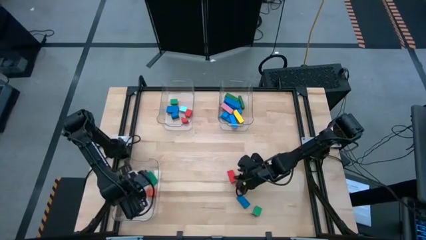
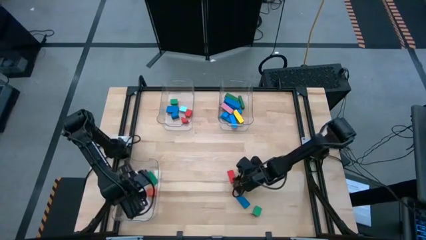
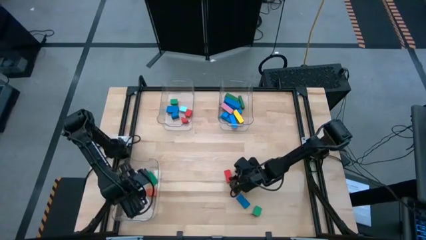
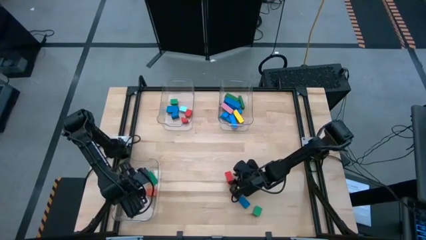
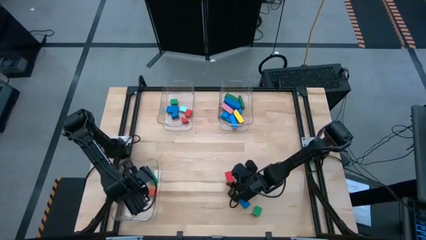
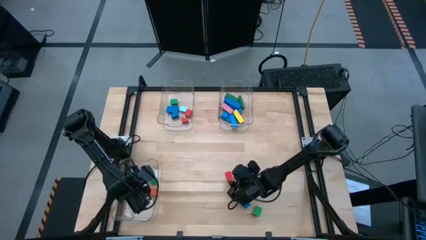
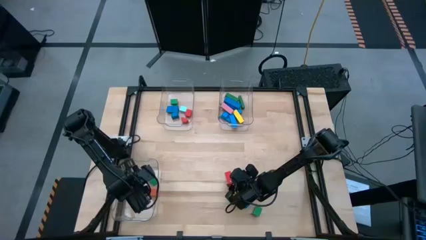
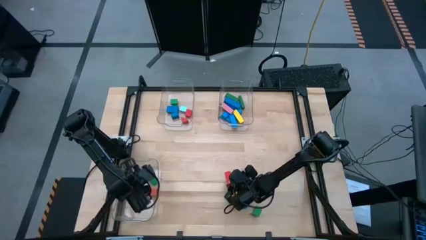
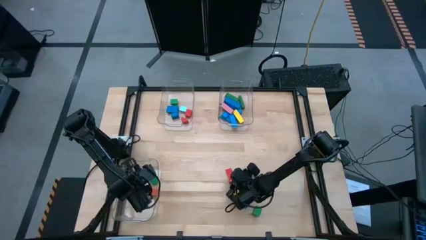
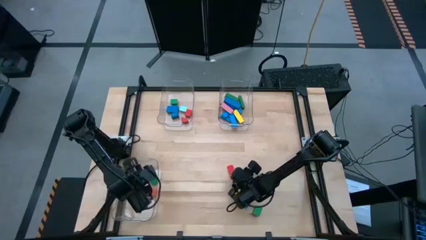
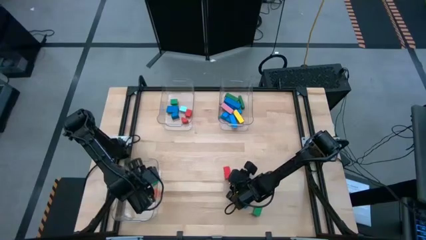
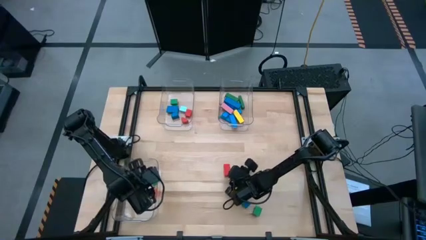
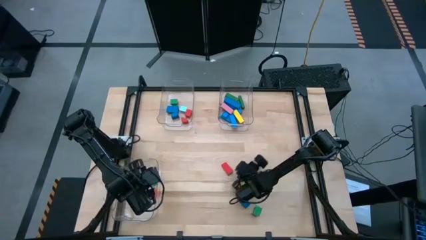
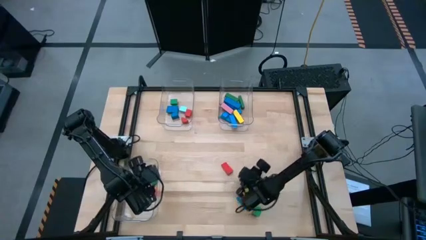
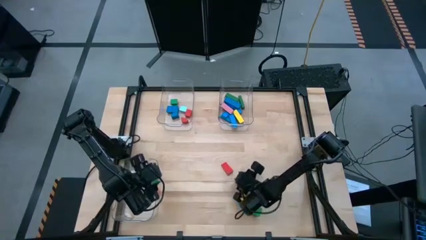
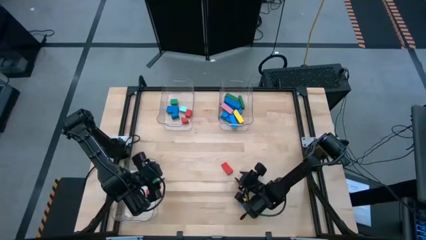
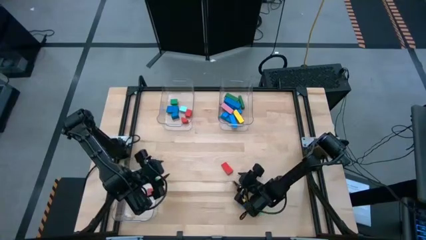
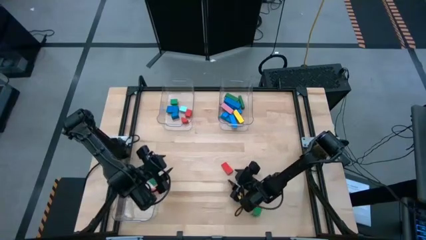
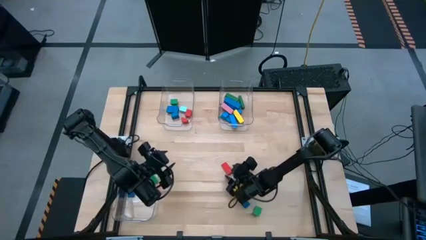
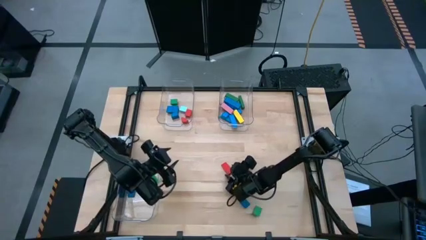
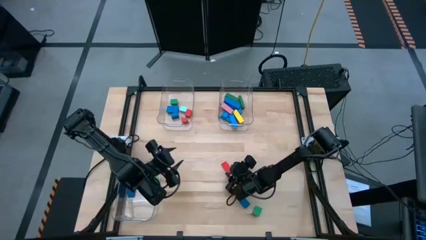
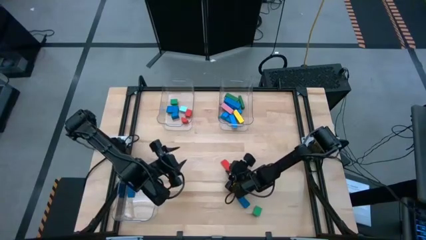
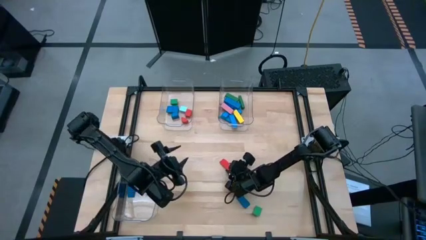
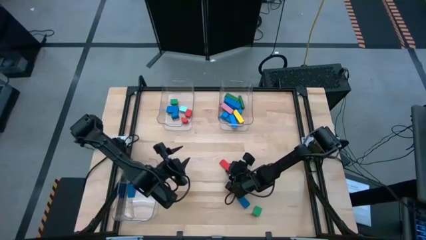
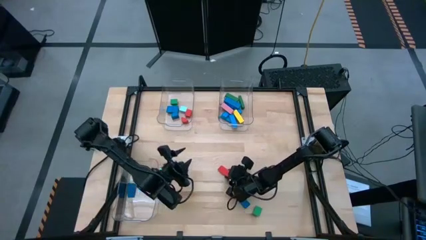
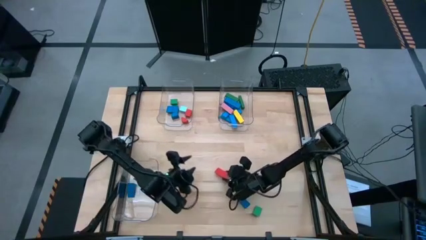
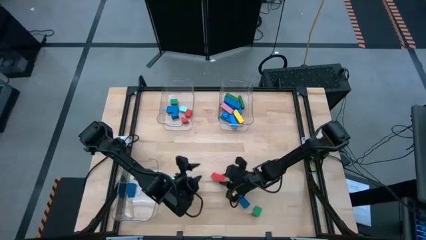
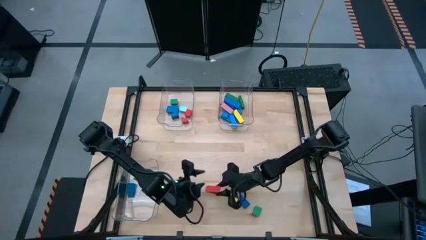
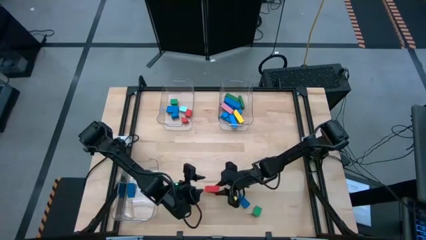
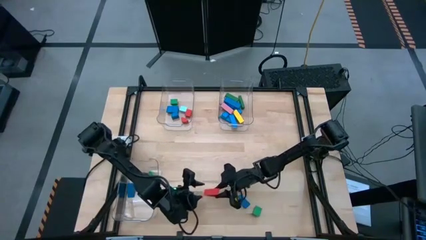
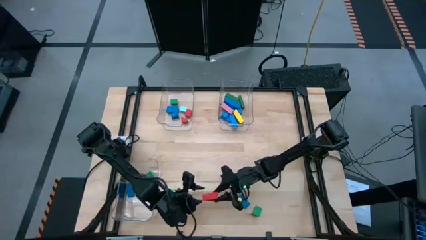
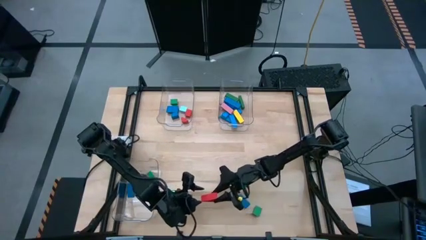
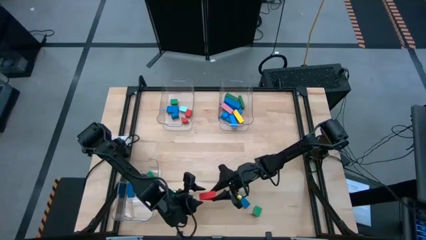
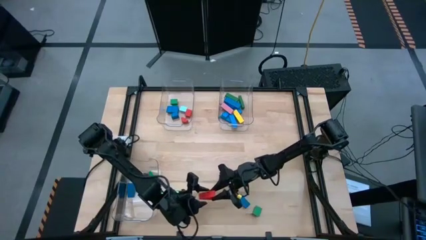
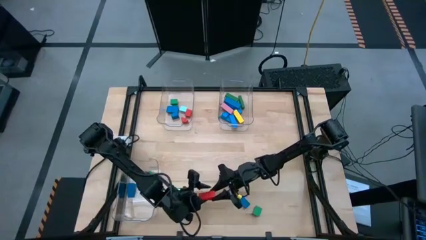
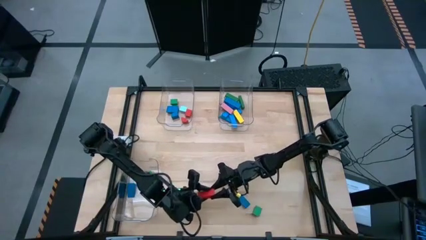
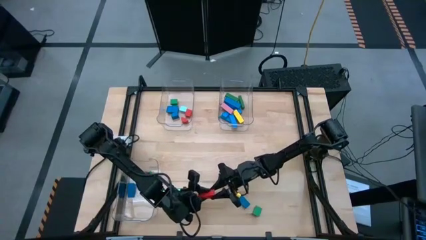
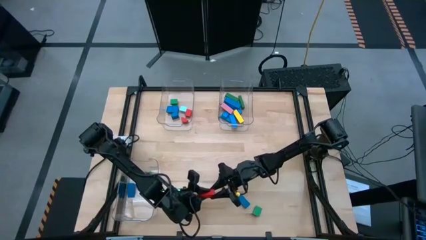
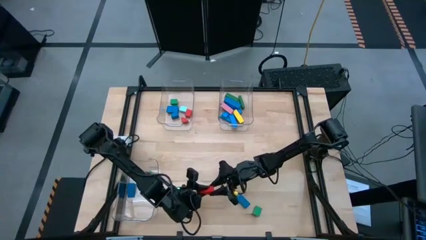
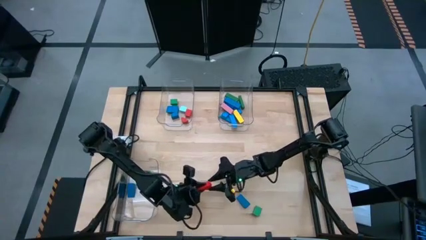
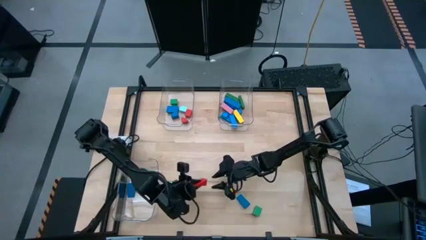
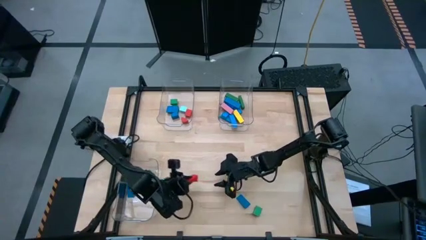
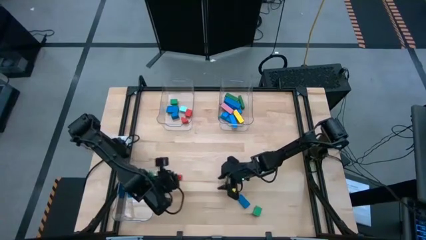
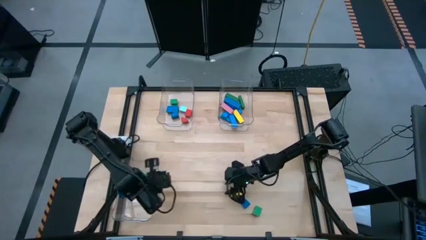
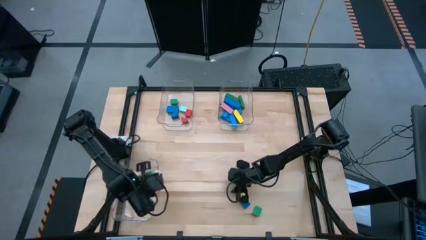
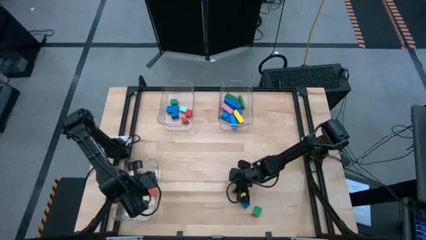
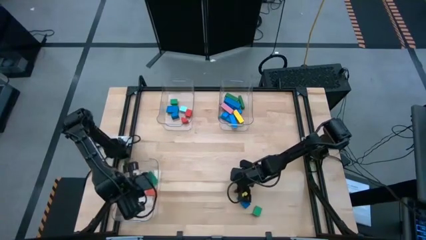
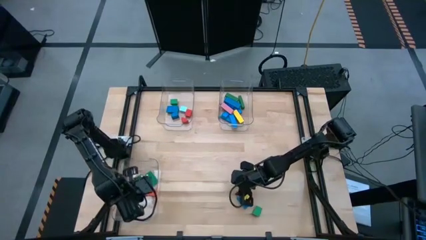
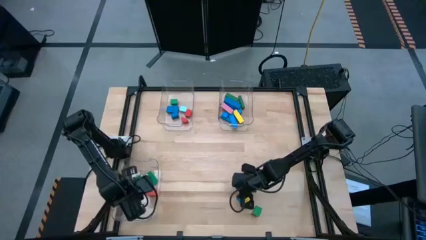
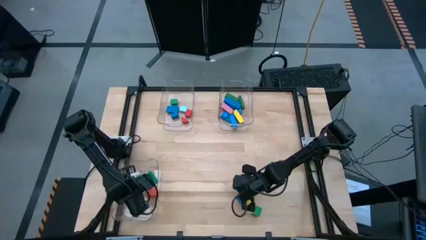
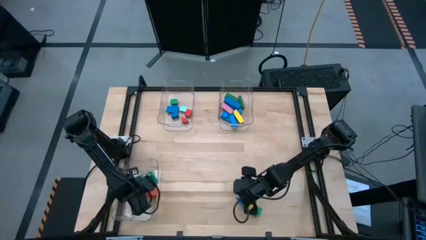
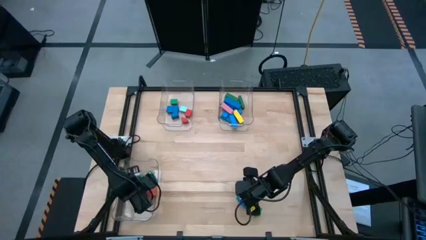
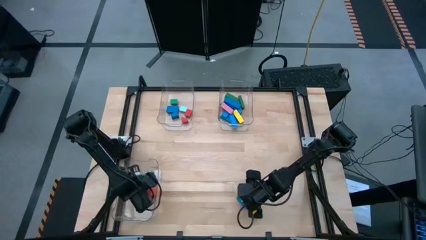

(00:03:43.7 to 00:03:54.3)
Task: Sort blocks by size
Put the red triangular block into the bottom transparent bin

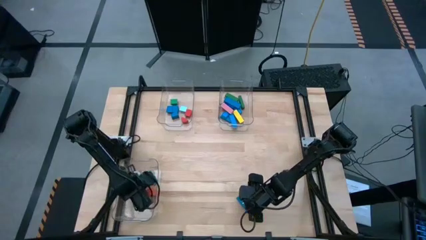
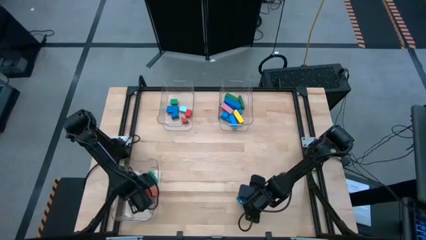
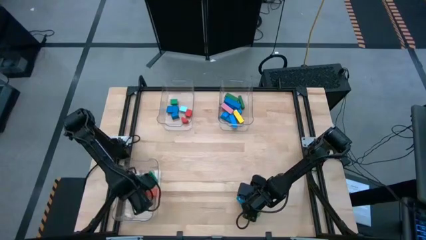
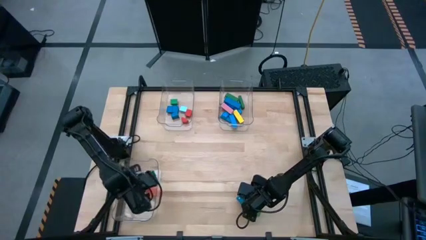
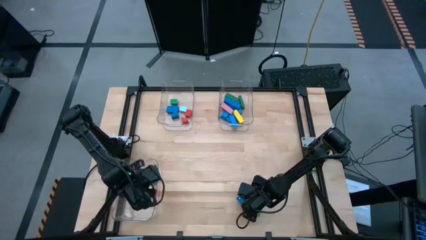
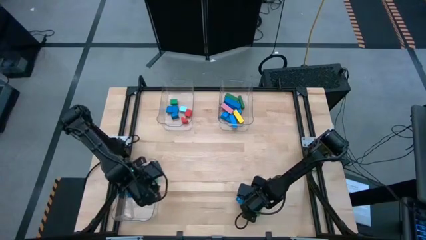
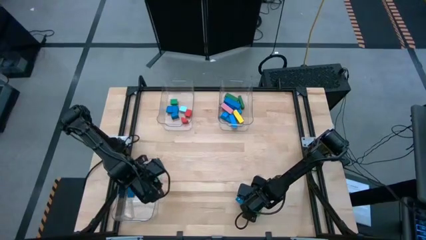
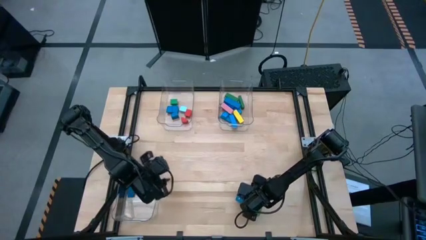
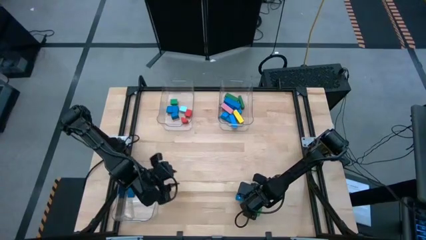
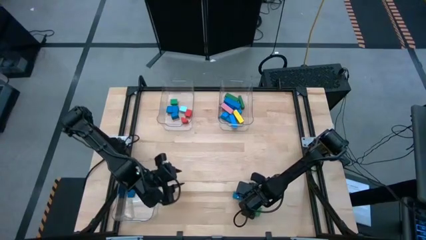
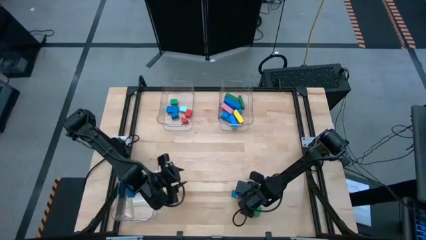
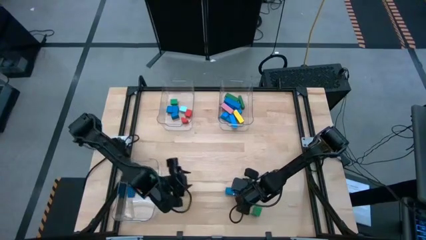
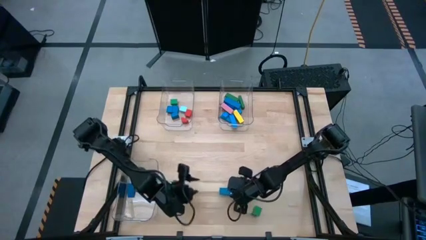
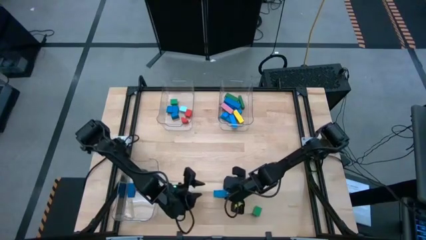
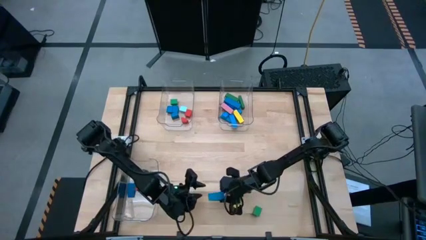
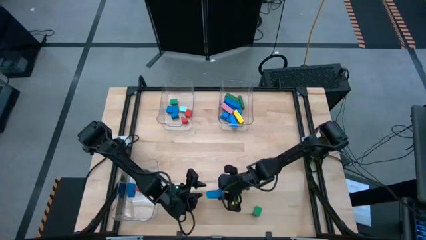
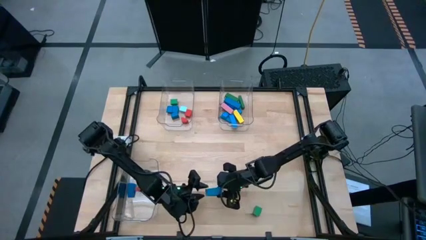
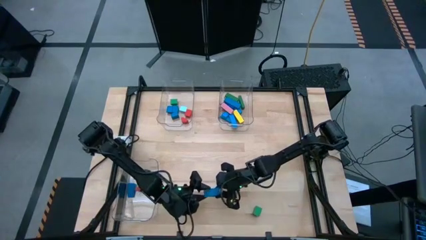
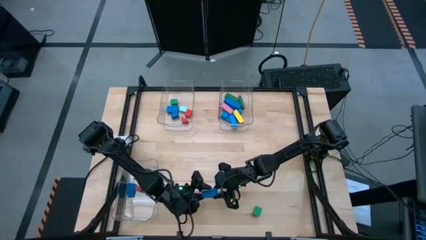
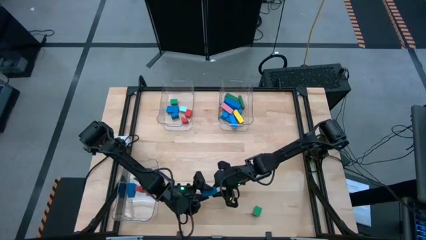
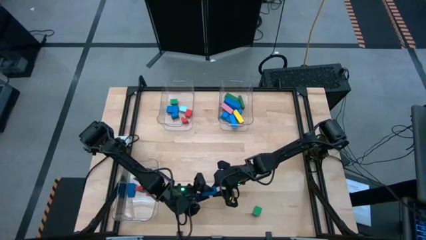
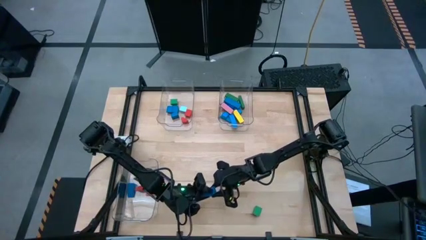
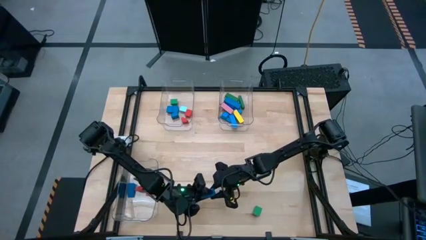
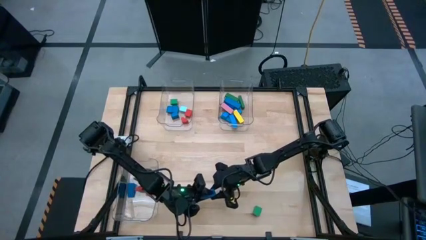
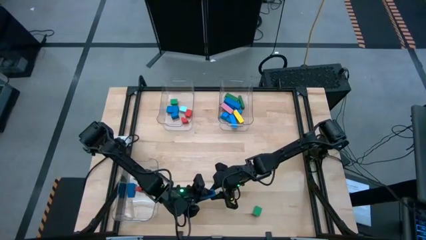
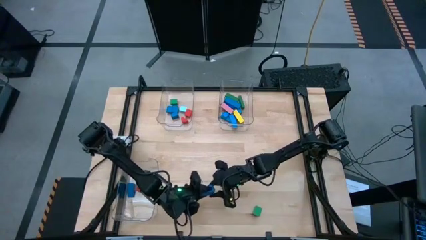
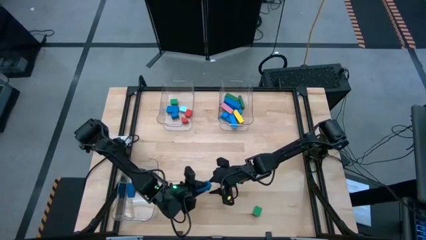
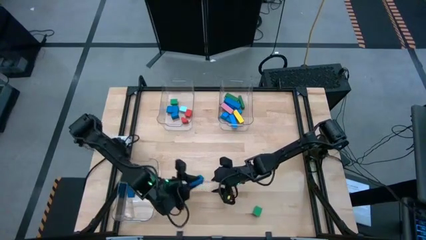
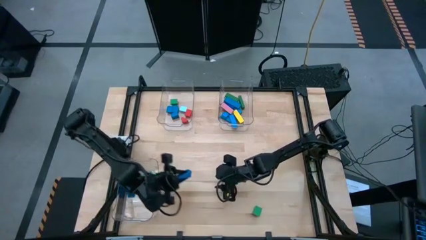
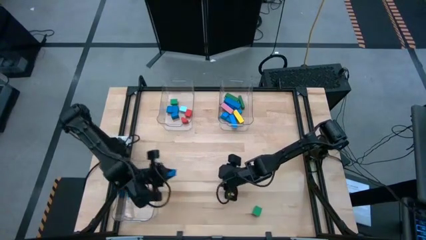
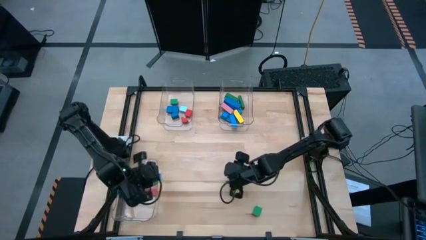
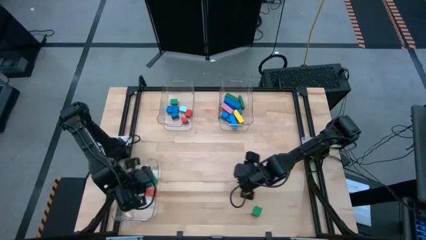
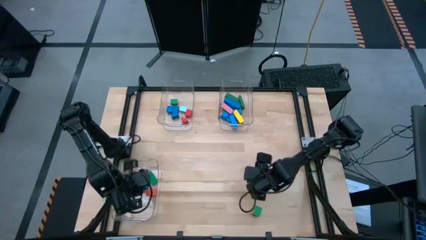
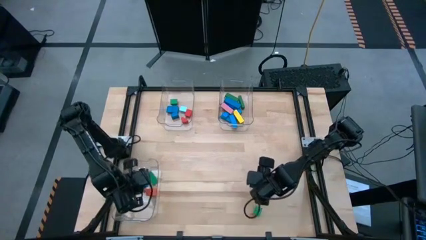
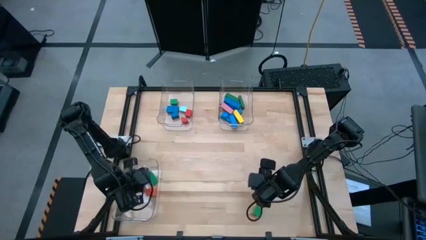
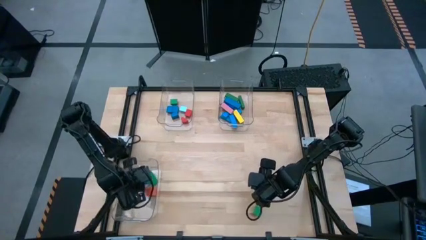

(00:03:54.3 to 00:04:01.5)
Put the blue triangular block into the bottom transparent bin
